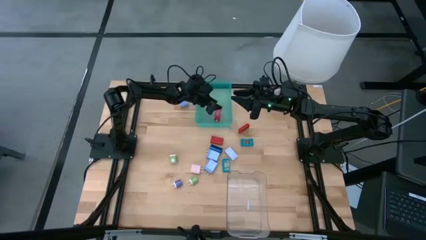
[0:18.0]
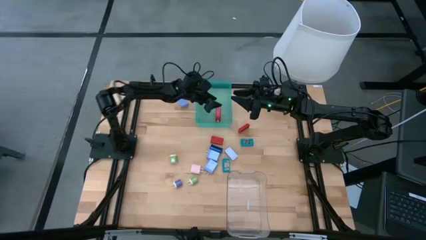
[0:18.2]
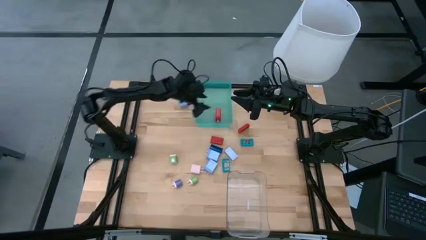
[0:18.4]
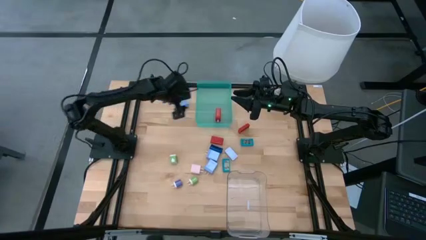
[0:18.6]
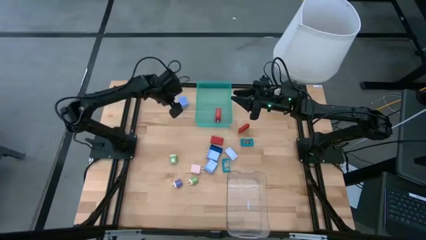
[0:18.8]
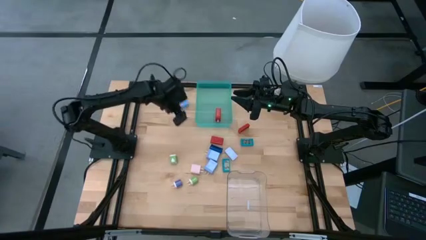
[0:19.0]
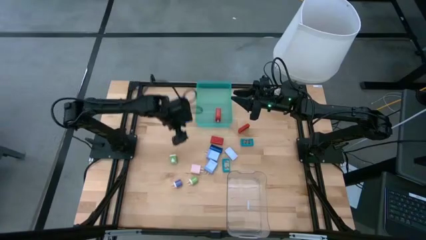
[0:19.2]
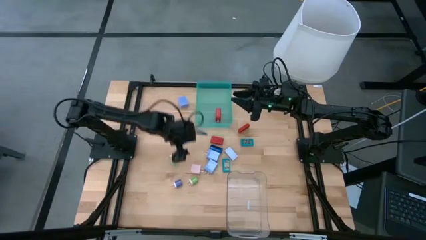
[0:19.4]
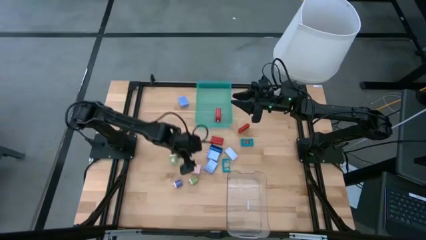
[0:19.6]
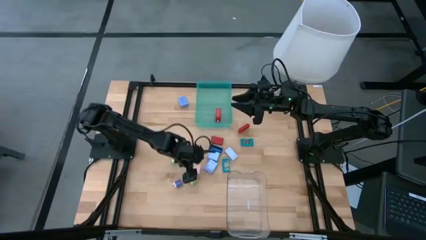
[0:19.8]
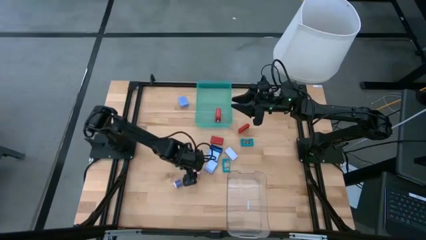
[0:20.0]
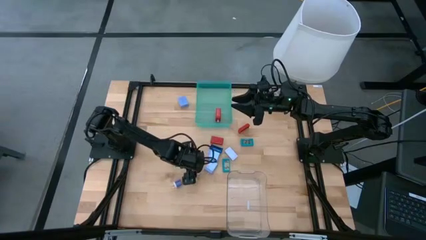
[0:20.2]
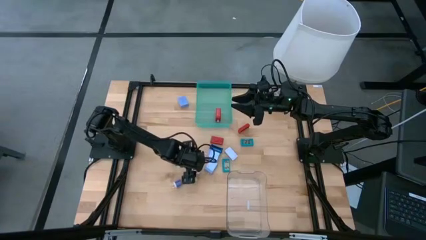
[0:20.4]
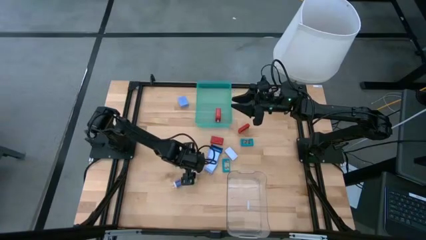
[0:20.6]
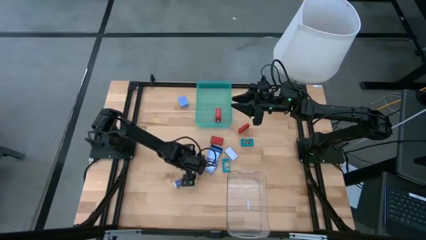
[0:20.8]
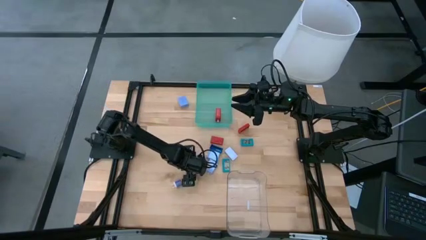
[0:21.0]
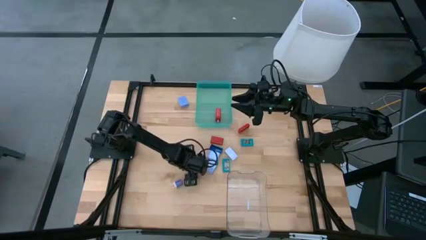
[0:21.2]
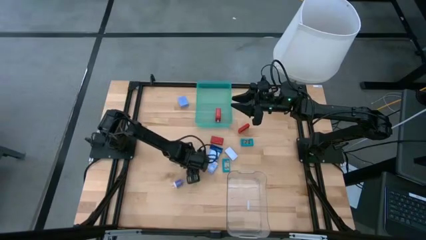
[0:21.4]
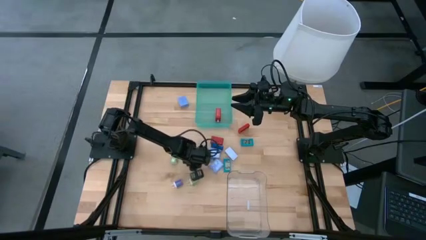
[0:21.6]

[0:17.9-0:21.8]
Task: Pick & Place Office items
Put the pink charger adapter into the green bin

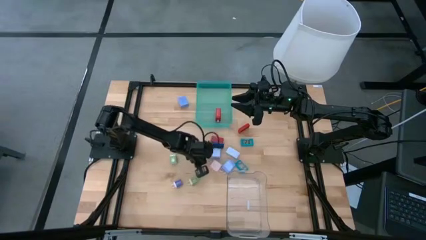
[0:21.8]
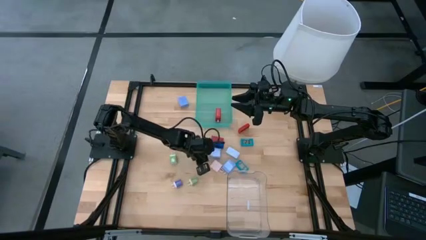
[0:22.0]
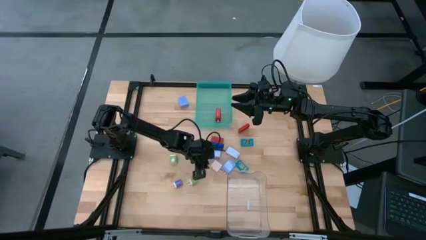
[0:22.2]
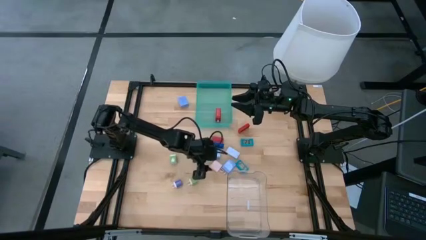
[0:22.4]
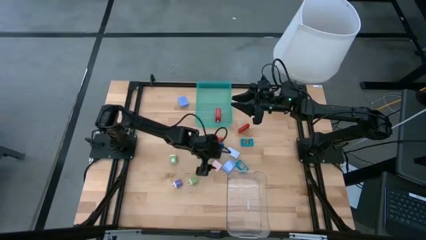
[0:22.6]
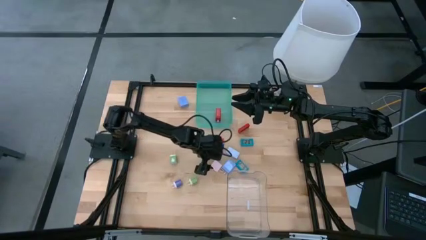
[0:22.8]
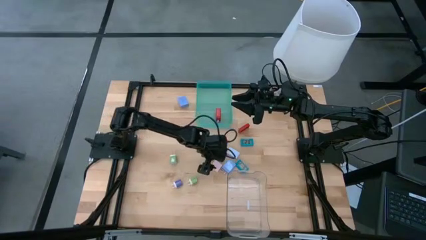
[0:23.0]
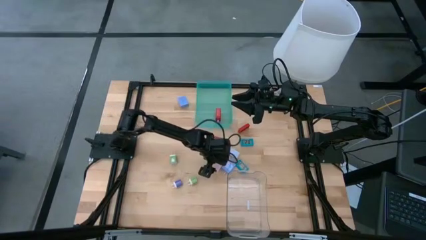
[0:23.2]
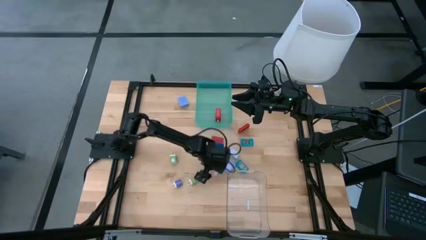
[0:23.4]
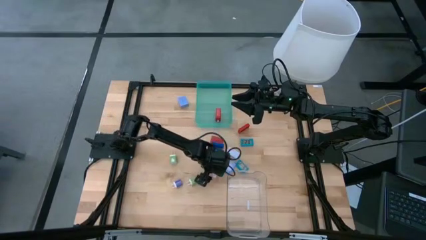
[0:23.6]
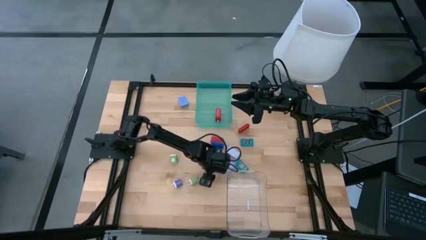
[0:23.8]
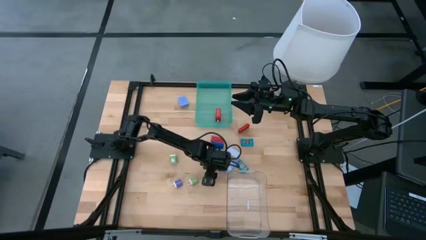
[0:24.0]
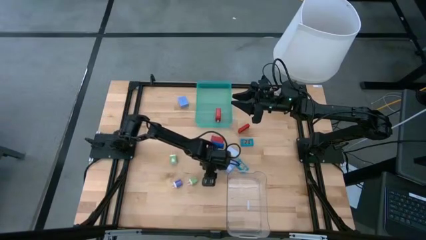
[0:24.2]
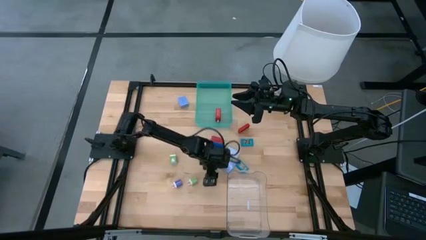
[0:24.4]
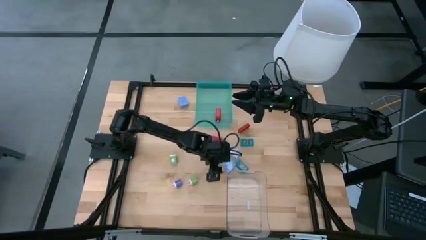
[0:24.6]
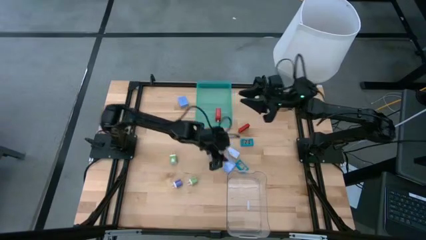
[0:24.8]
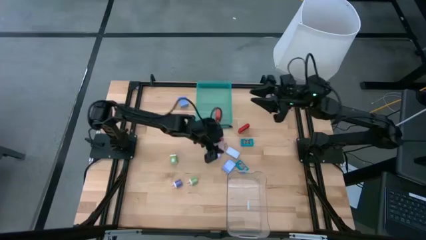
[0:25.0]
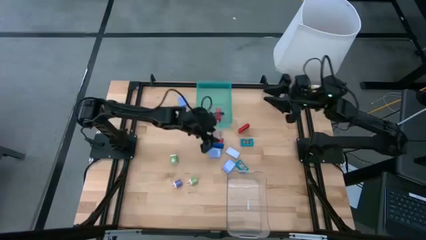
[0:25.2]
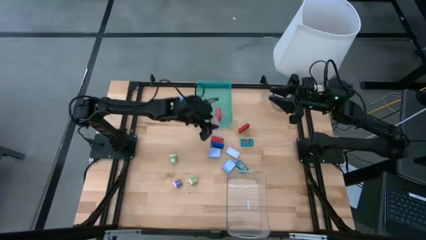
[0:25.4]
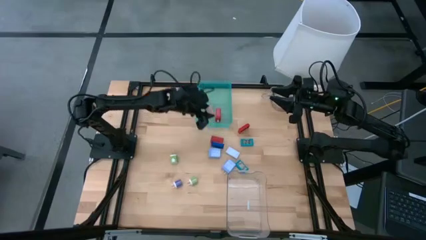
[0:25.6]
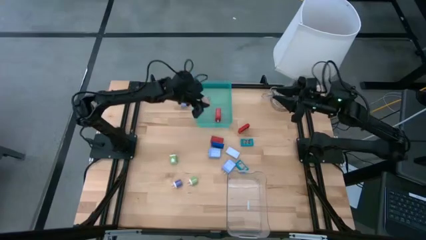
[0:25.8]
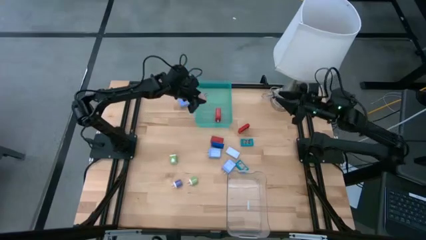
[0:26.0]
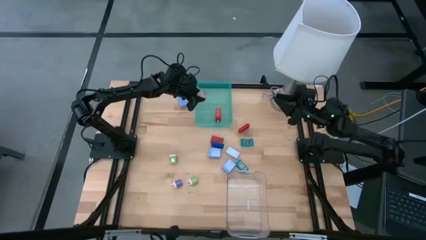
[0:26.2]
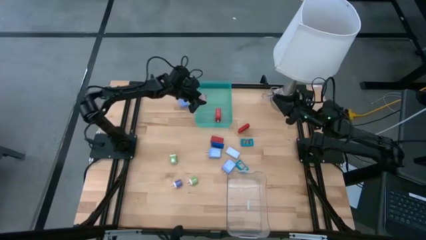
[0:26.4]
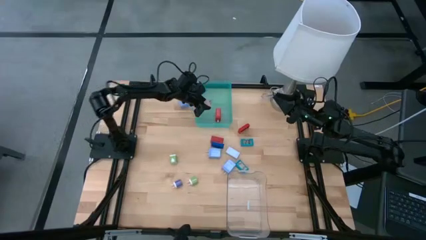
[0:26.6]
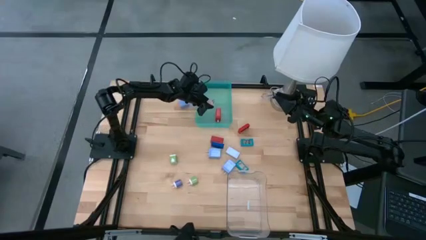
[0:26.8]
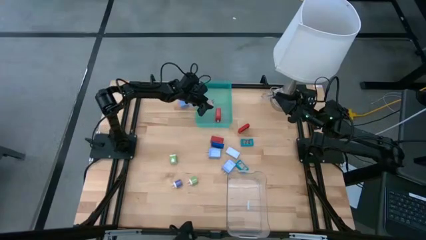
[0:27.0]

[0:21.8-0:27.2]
Put the pink charger adapter into the green bin

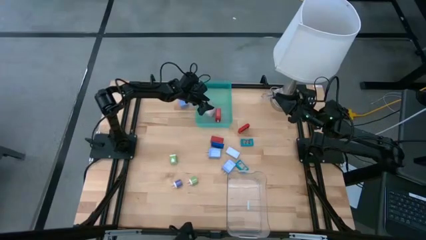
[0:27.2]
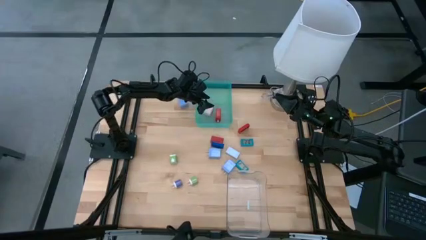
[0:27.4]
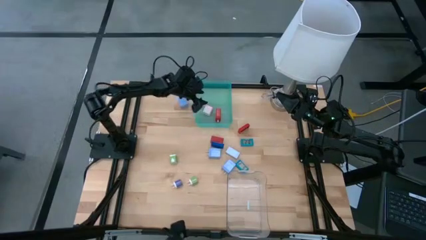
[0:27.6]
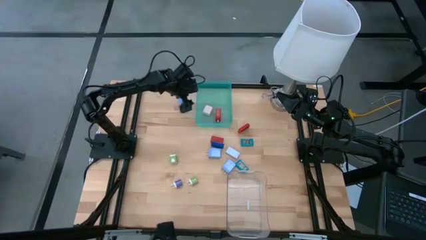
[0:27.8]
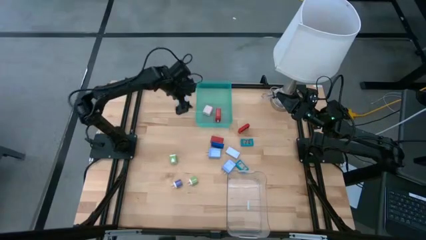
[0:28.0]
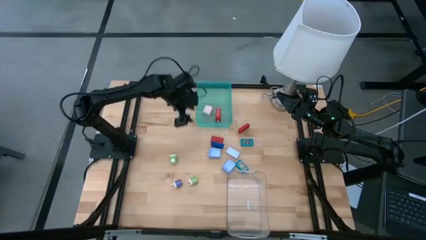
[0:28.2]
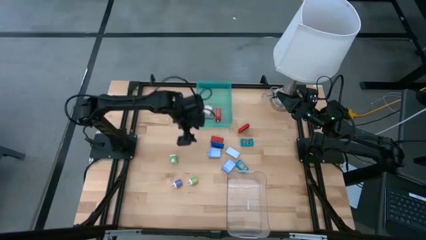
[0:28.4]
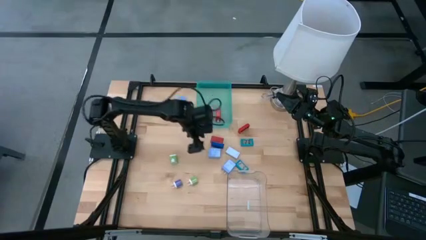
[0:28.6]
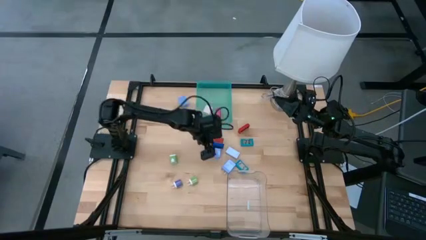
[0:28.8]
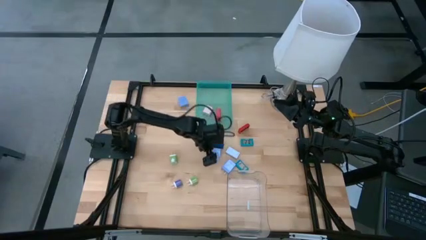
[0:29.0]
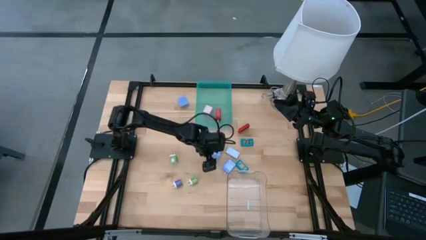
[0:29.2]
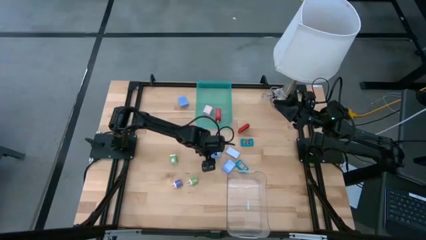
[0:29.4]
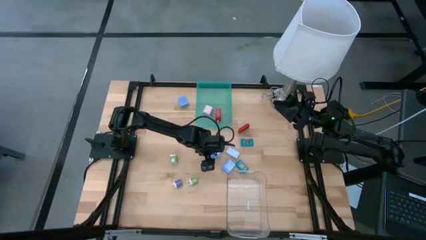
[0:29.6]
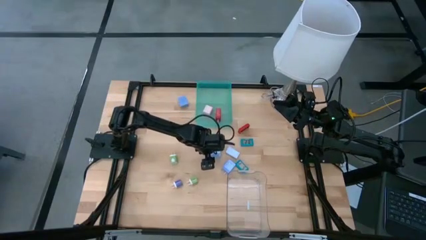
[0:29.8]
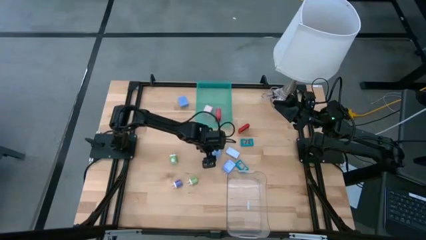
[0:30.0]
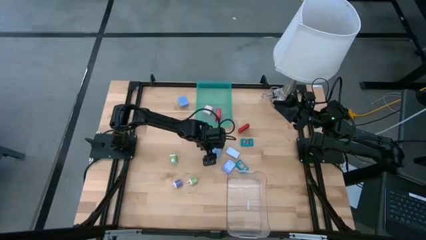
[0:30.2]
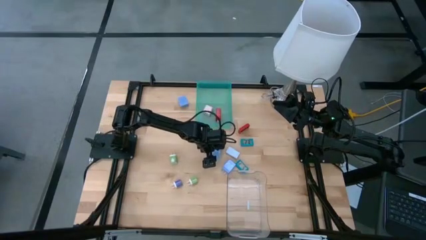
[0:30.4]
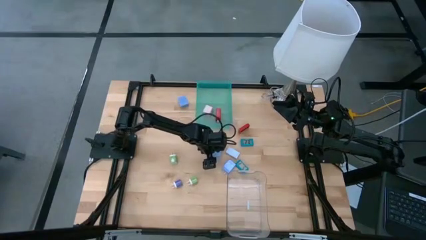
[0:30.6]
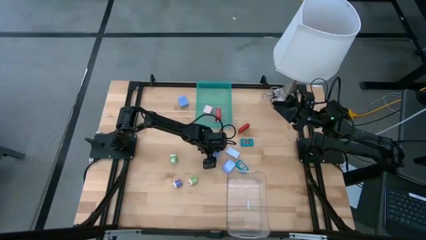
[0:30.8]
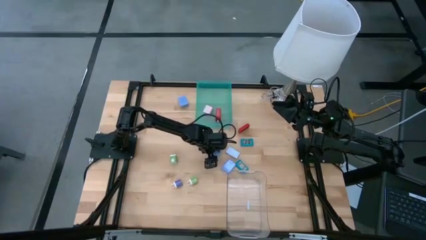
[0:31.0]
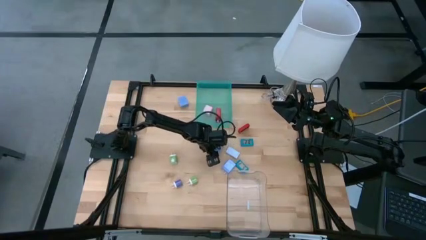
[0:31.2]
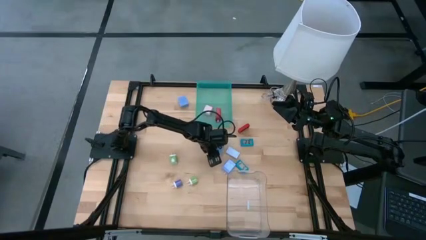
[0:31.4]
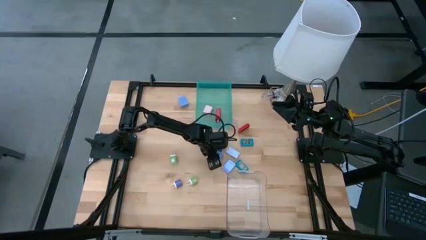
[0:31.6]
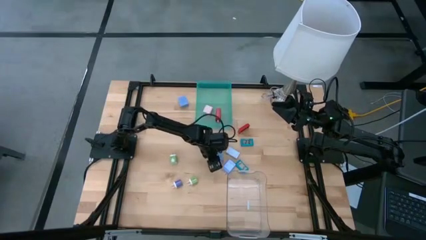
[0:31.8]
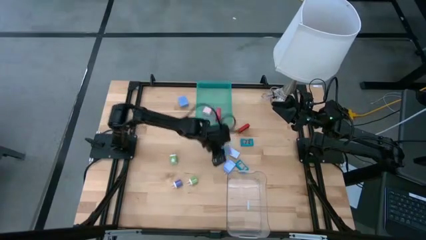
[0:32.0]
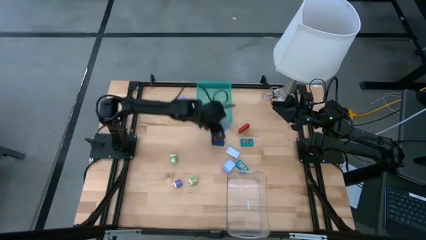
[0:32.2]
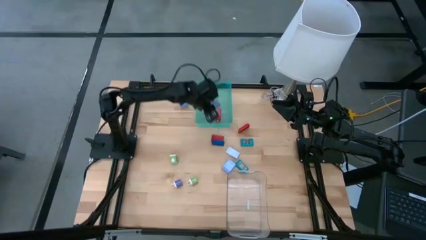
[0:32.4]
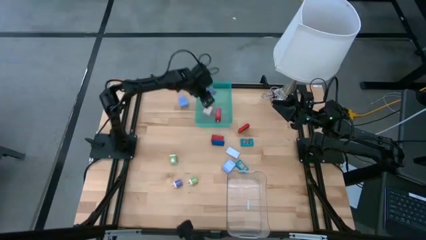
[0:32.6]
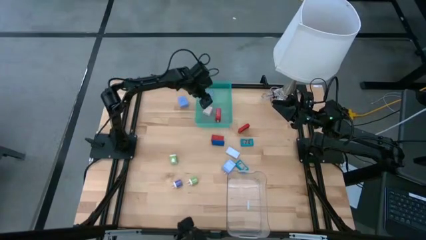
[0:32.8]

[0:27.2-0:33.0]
Put the middle blue charger adapter into the green bin

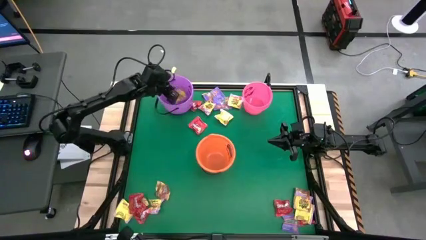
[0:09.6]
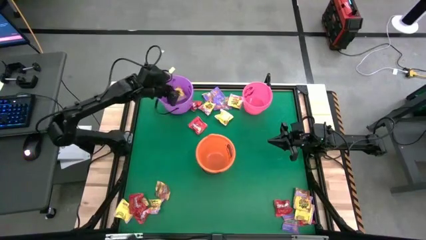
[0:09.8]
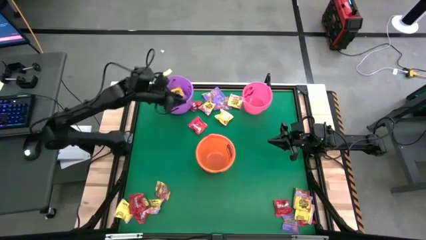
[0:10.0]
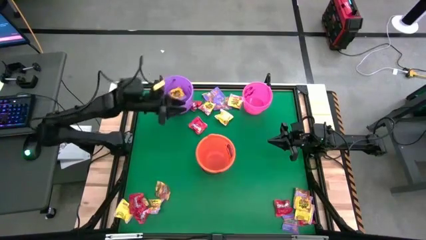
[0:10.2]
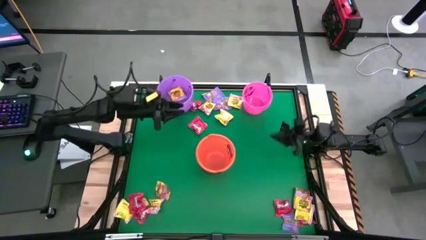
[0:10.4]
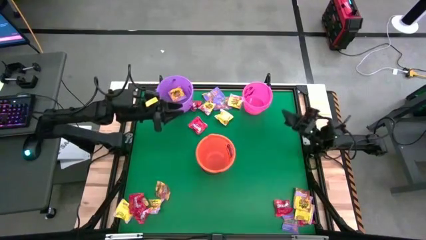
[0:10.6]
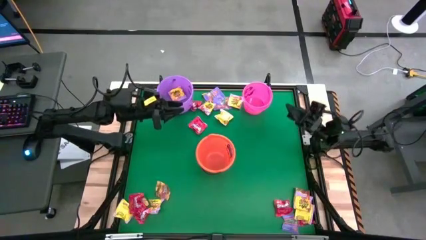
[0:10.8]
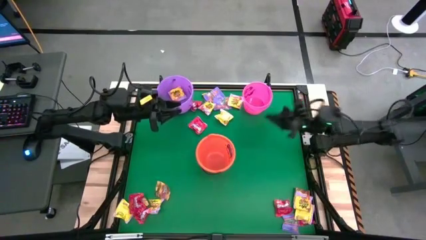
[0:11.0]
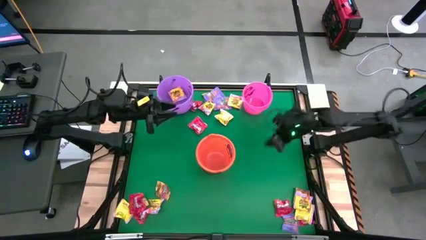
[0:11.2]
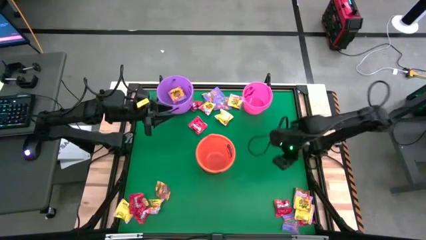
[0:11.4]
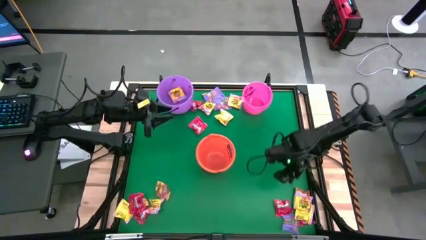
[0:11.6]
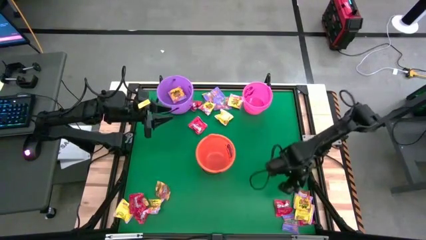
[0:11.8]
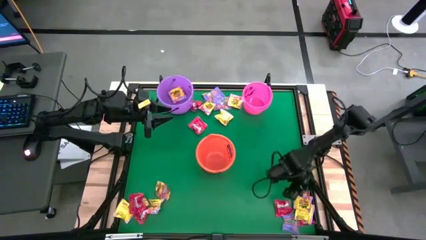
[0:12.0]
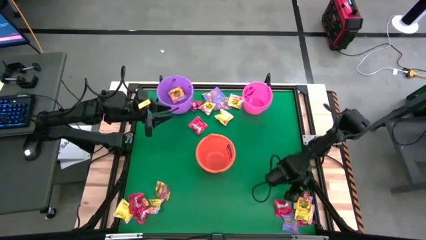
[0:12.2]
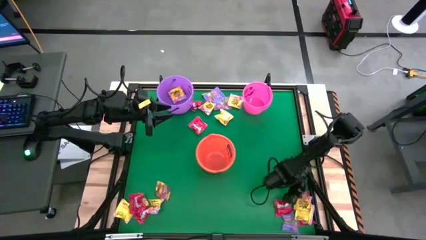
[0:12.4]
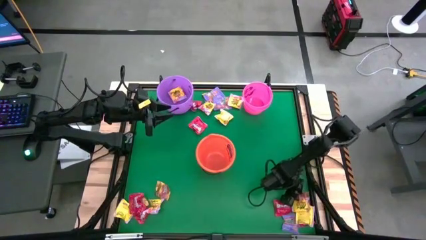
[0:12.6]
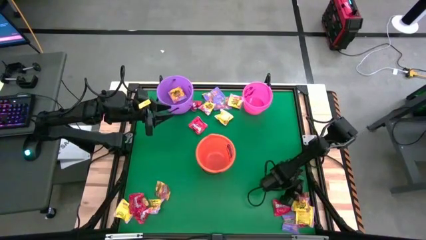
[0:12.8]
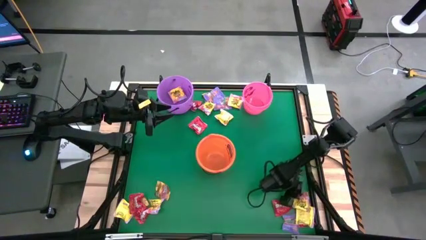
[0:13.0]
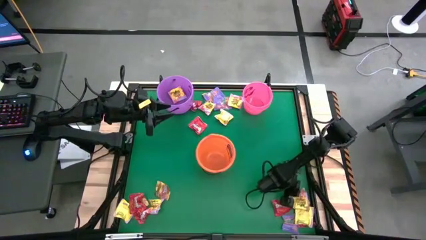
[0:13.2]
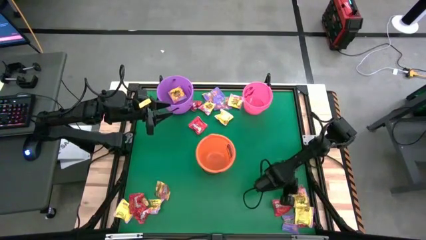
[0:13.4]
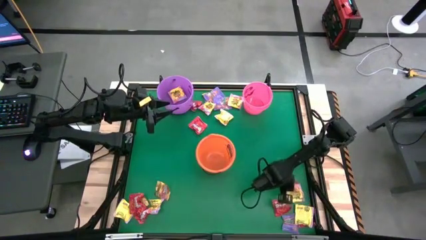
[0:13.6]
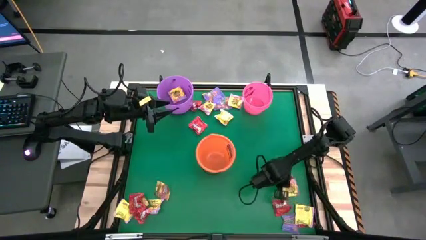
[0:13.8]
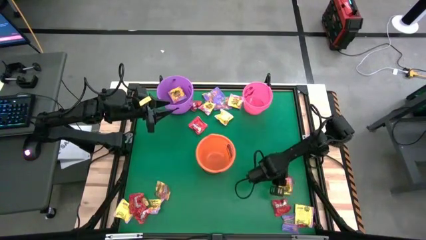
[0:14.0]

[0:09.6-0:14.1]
Task: Sort candy by brand, put in halloween buckets
Put the yellow candy into the light violet bucket
